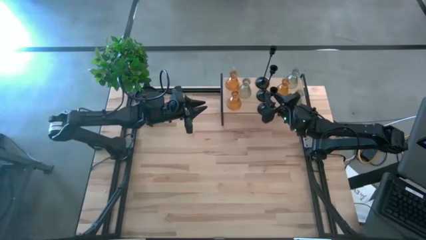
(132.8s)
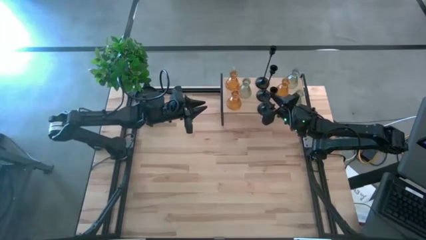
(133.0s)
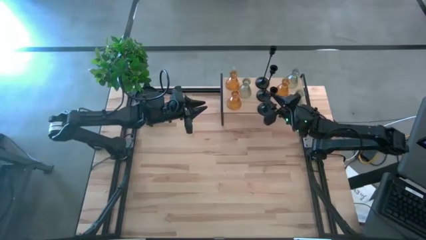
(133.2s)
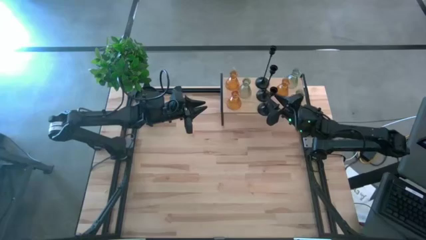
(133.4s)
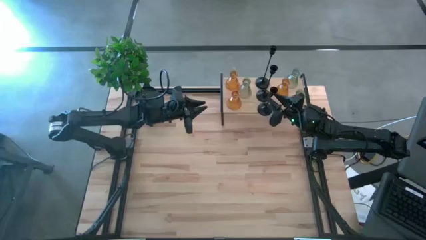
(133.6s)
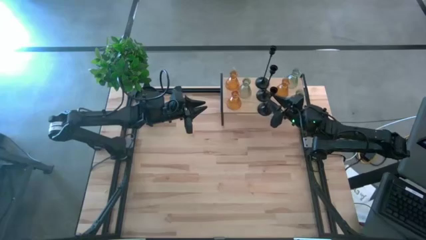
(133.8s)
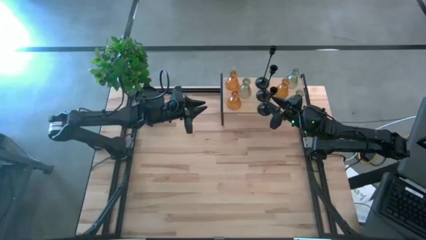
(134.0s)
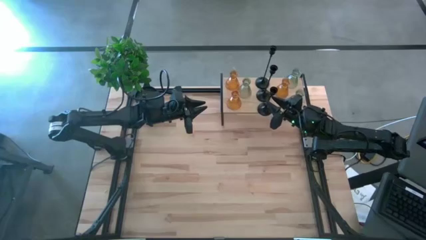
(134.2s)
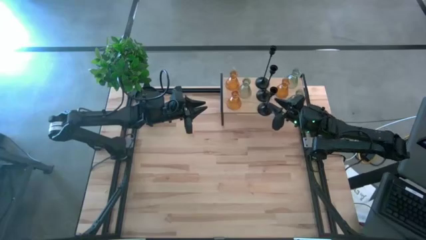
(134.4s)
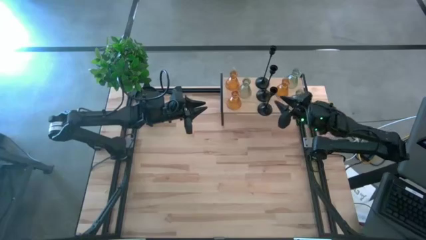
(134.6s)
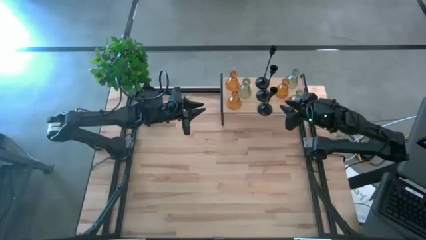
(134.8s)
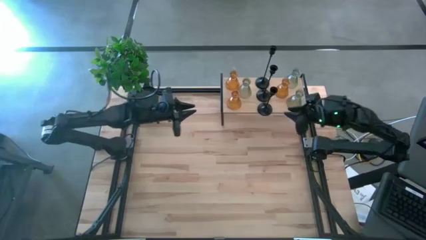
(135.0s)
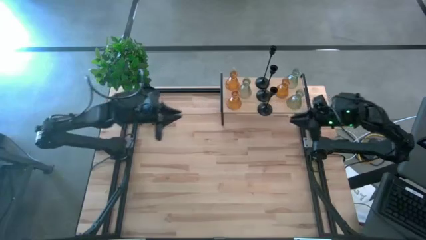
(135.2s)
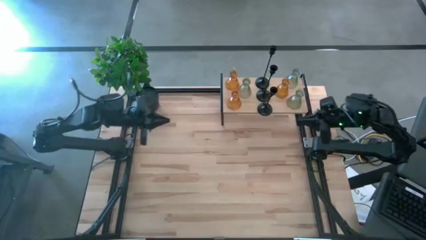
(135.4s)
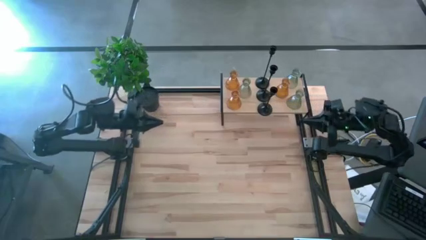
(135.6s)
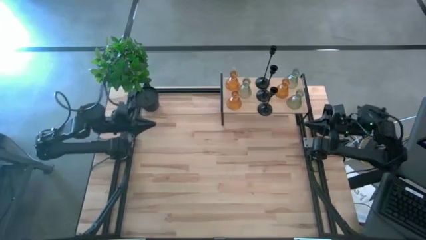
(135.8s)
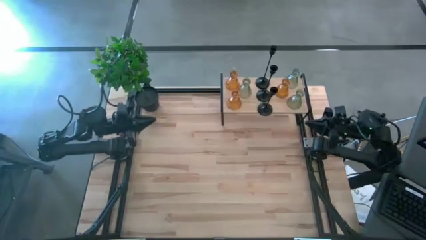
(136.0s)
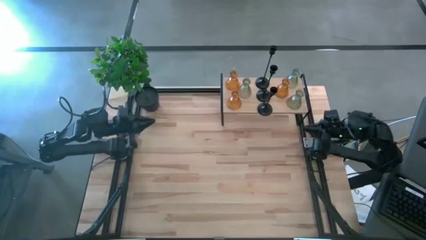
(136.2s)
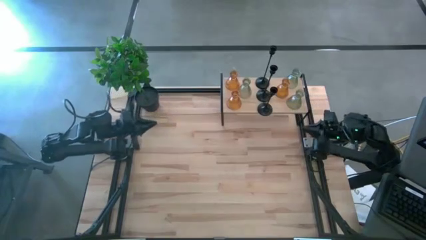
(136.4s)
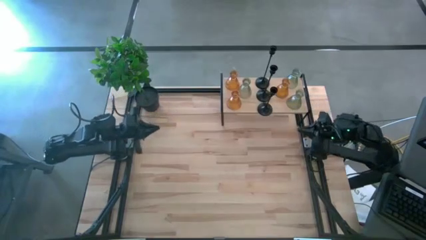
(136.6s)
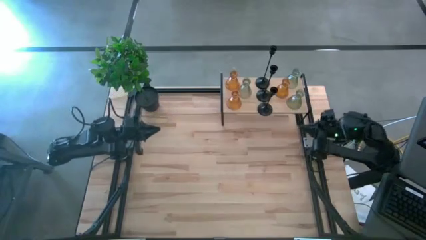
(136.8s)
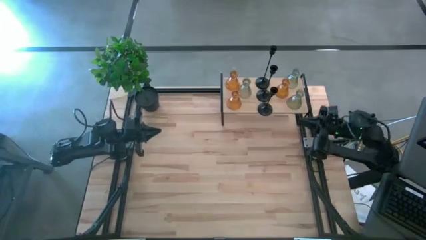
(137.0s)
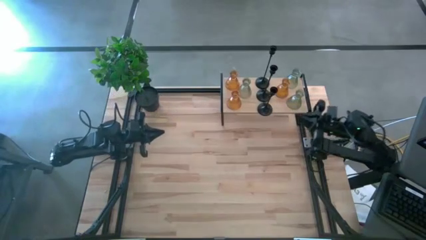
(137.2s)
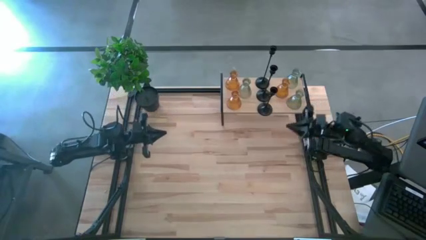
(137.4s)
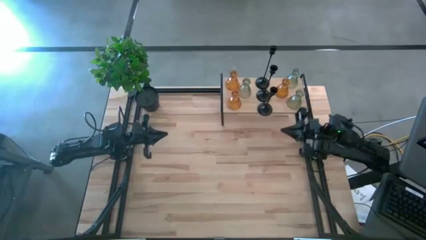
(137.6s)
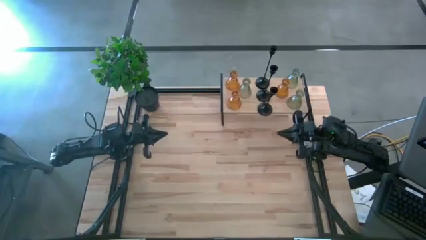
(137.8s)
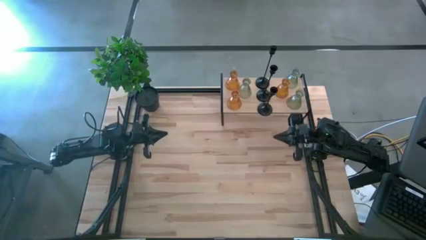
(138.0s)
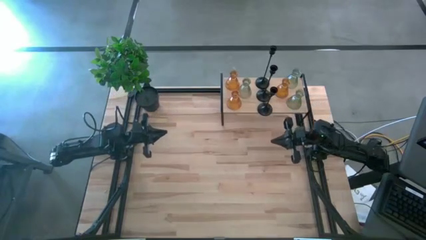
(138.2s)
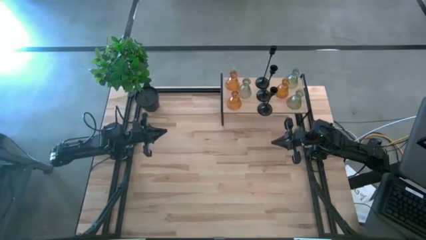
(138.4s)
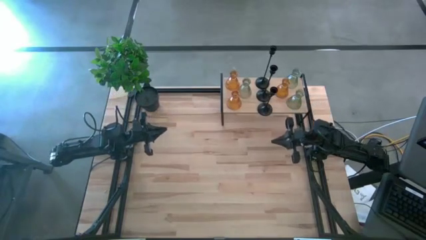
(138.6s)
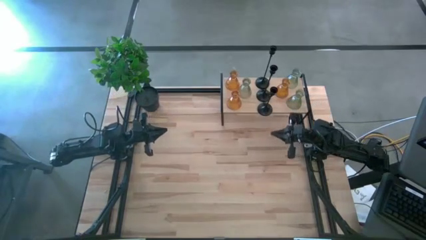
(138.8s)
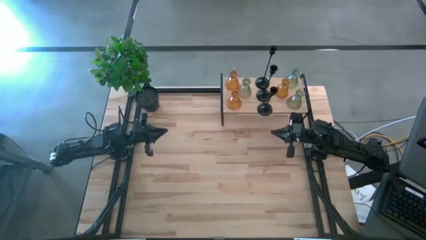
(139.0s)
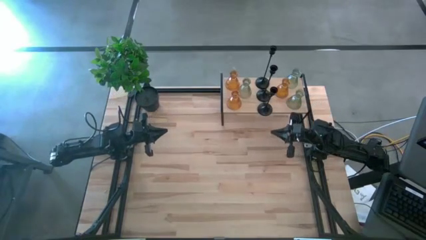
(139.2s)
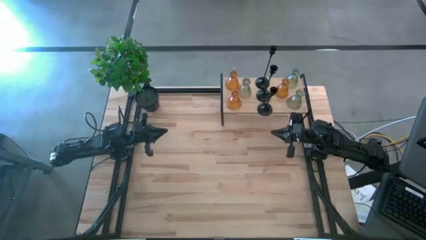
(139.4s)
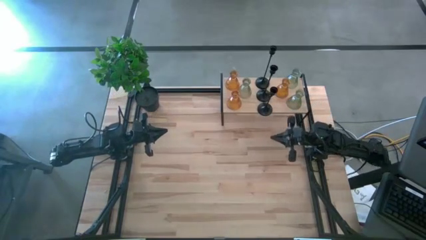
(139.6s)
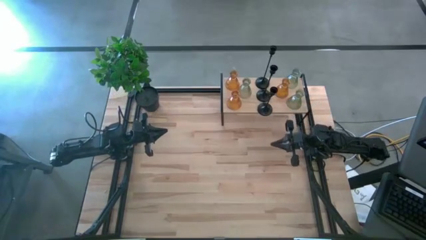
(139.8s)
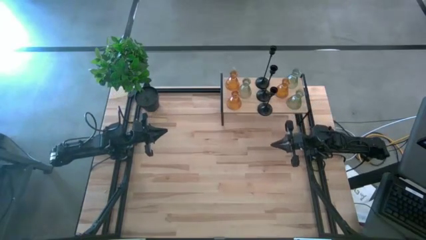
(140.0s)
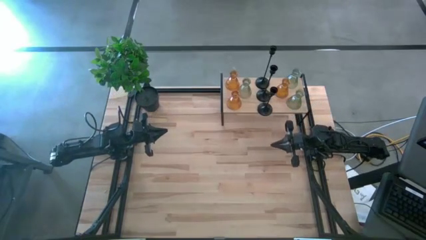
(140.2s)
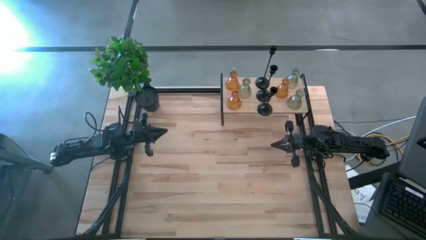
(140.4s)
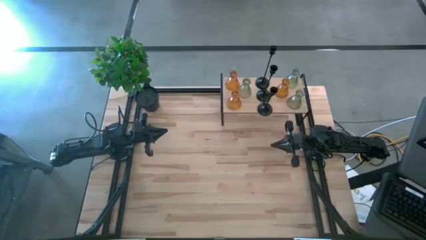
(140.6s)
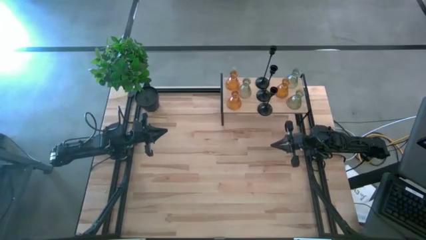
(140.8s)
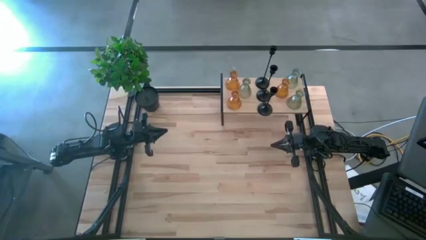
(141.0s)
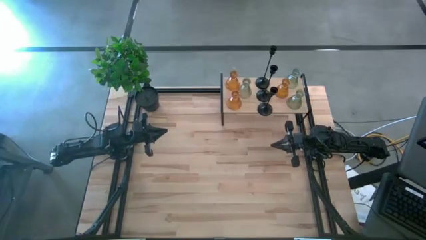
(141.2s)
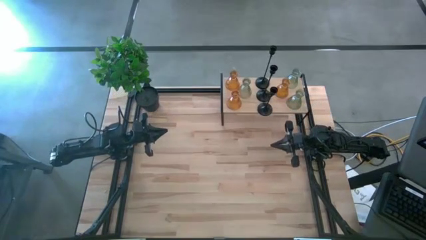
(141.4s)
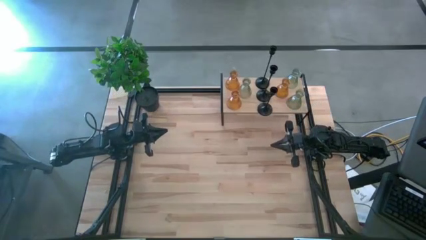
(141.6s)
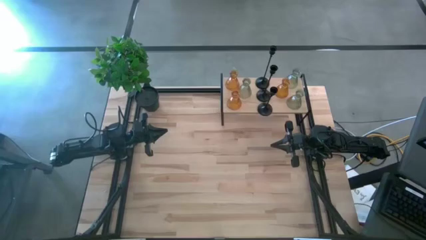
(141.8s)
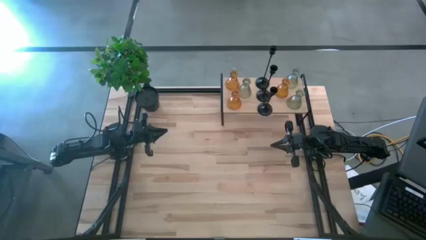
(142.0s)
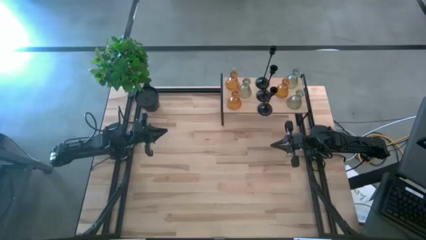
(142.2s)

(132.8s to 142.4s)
Task: Pick & Place candle stick holders
Return to Home Position

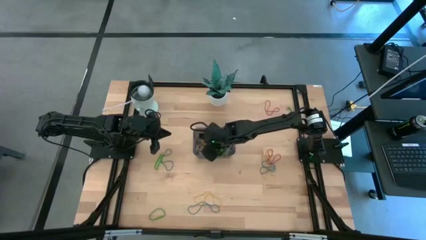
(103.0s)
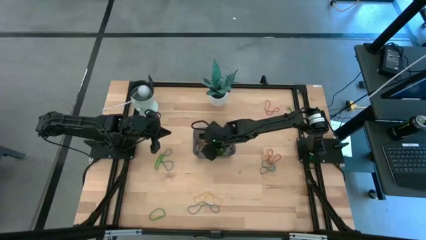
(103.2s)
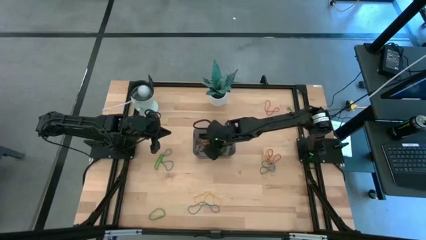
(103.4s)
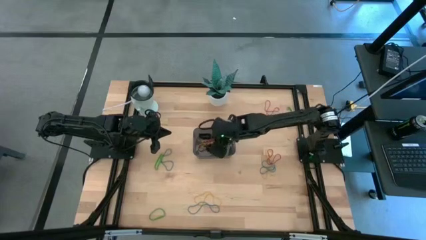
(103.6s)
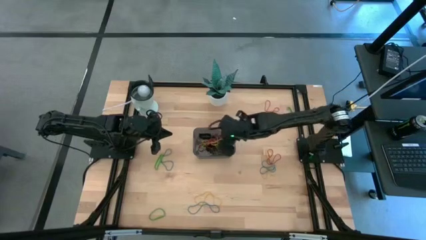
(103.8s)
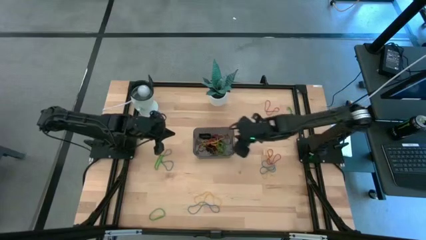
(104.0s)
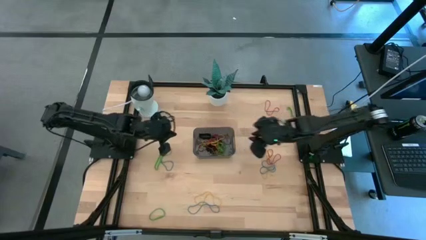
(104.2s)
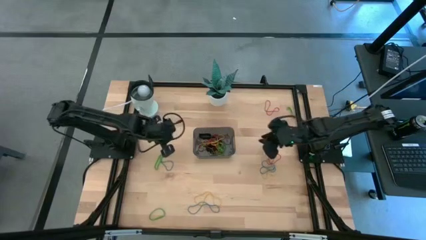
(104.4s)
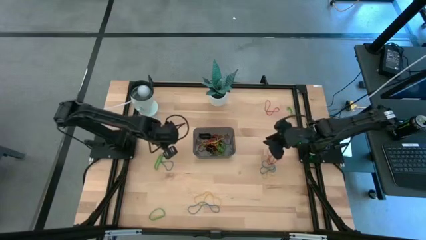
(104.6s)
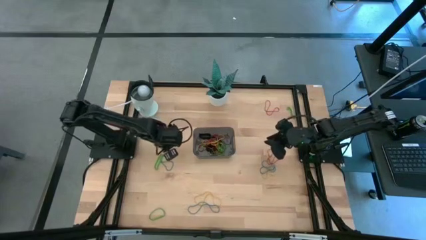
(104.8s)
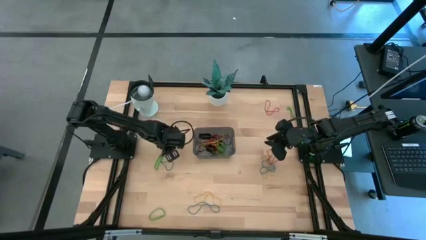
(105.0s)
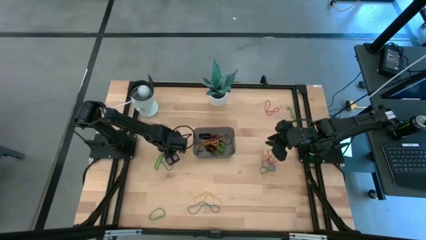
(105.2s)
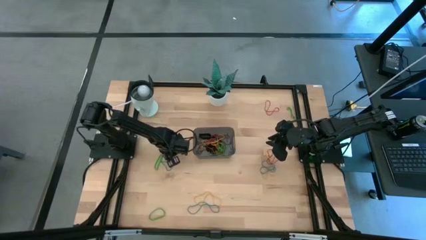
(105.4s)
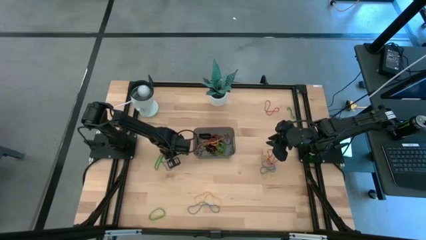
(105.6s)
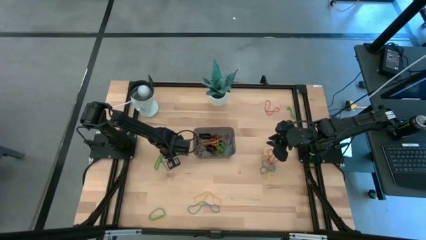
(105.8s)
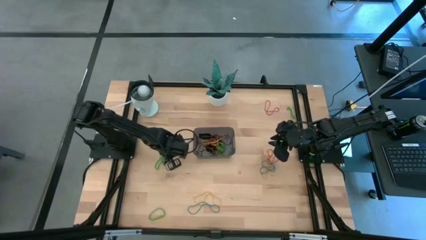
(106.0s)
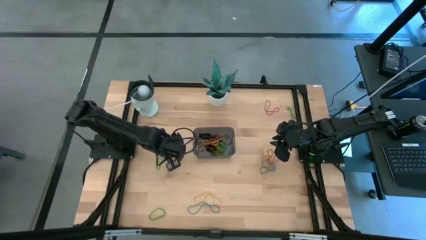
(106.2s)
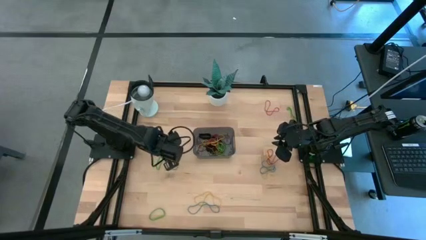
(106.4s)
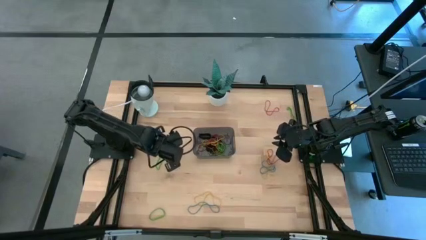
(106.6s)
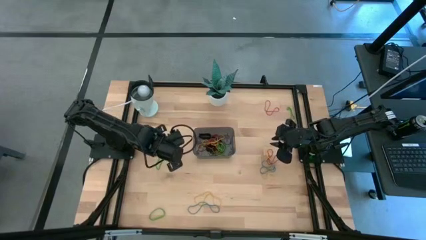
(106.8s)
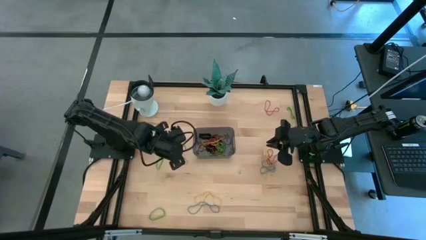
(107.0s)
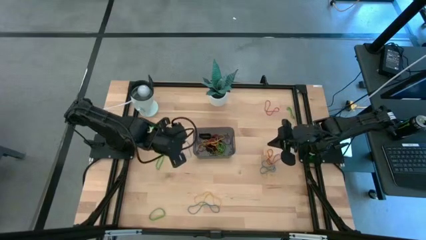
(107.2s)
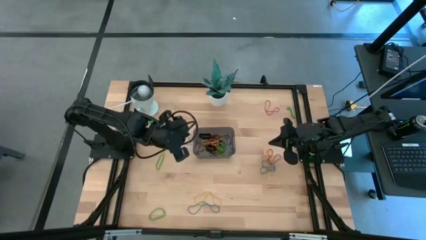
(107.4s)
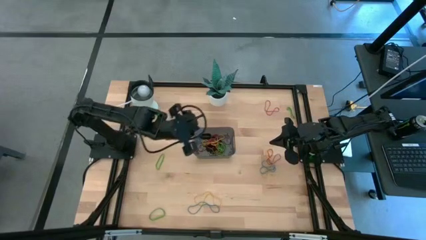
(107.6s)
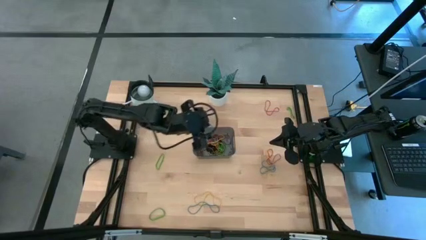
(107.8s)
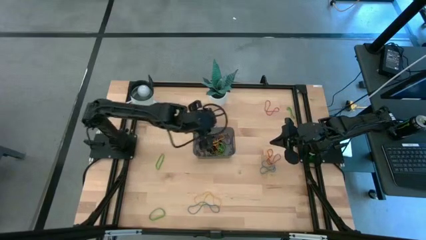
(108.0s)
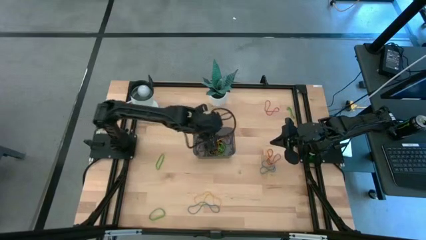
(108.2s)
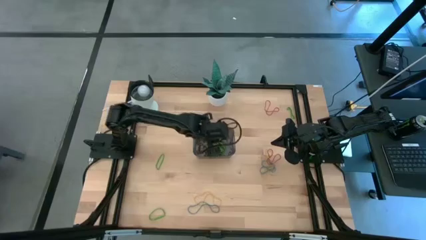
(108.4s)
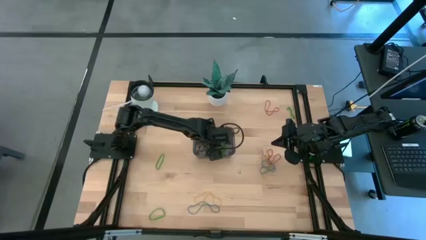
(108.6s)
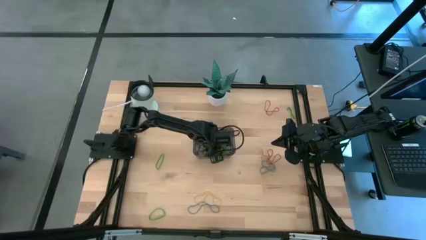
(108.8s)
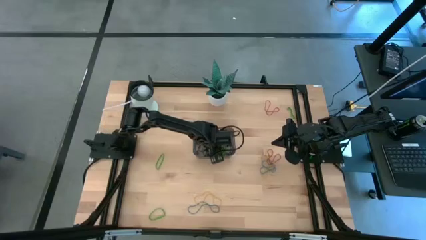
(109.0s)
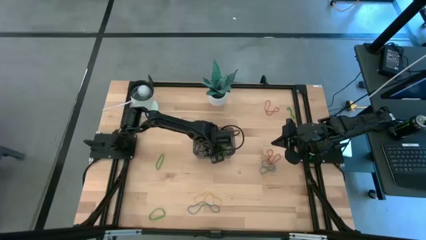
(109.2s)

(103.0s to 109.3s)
Task: Pick and place rubber bands into bin
Put the blue rubber band into the black bin
